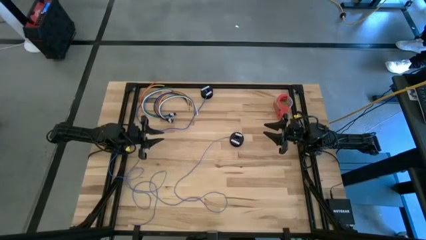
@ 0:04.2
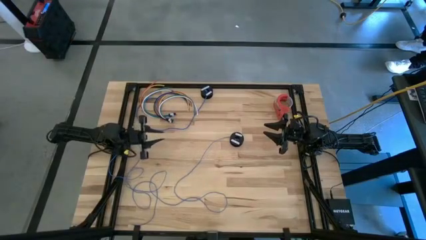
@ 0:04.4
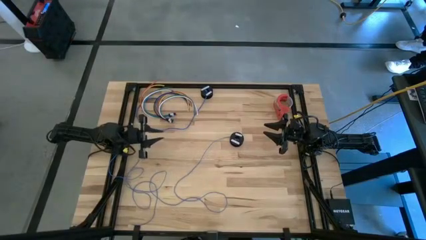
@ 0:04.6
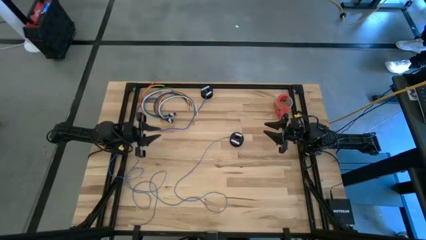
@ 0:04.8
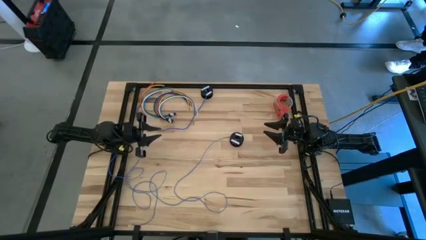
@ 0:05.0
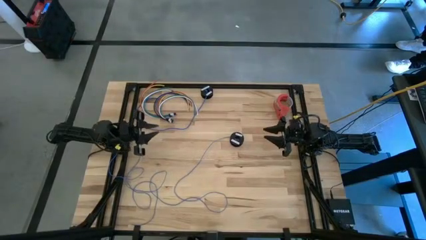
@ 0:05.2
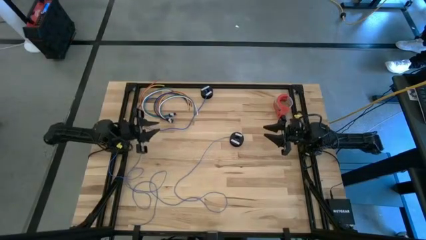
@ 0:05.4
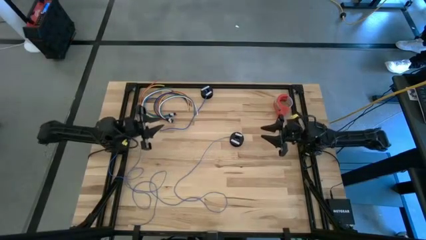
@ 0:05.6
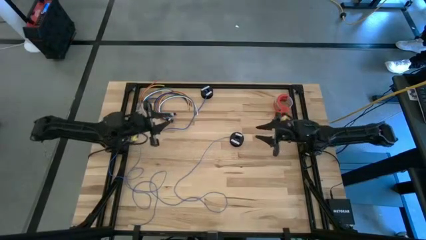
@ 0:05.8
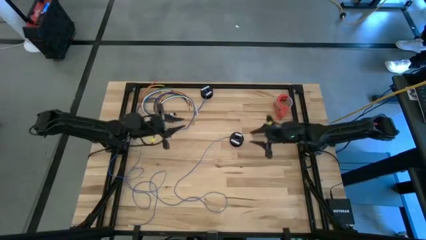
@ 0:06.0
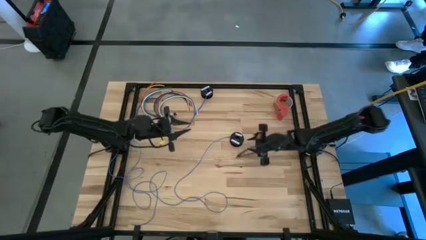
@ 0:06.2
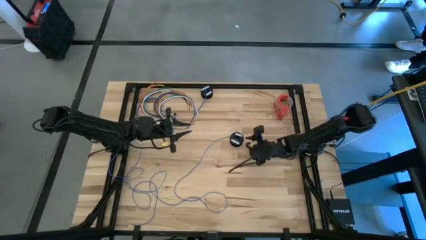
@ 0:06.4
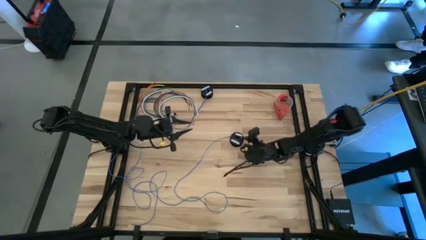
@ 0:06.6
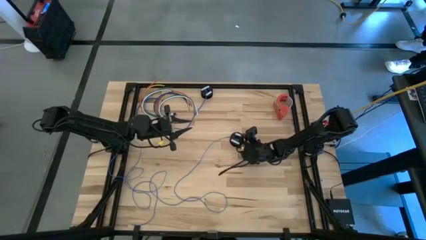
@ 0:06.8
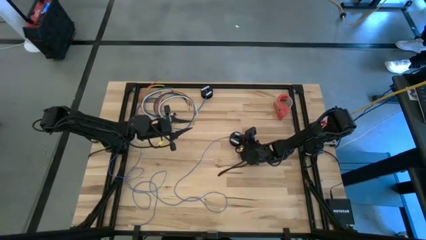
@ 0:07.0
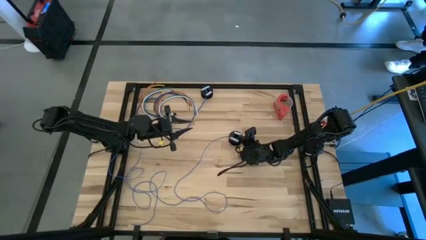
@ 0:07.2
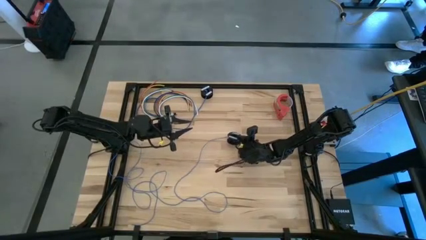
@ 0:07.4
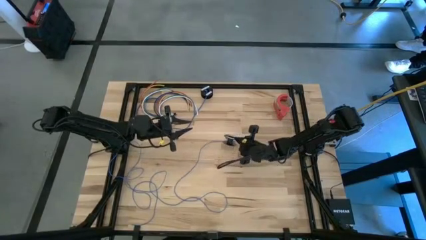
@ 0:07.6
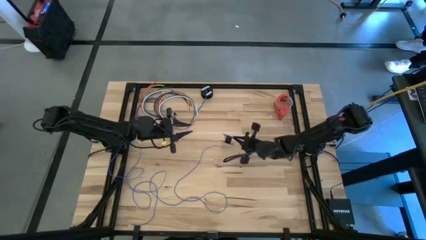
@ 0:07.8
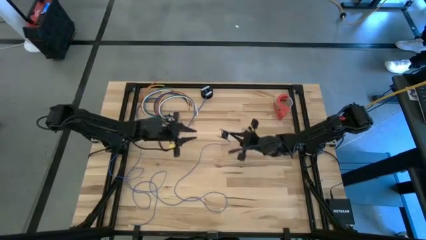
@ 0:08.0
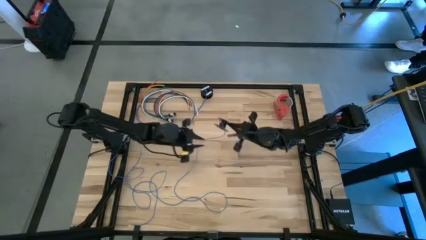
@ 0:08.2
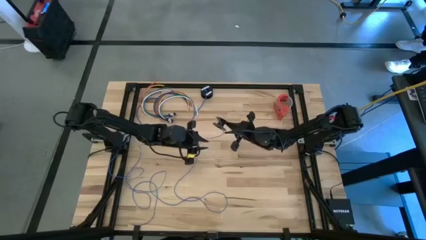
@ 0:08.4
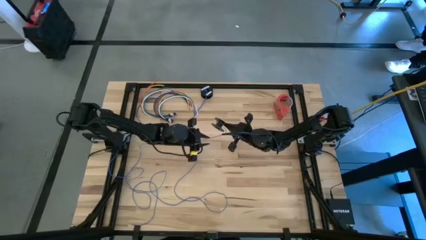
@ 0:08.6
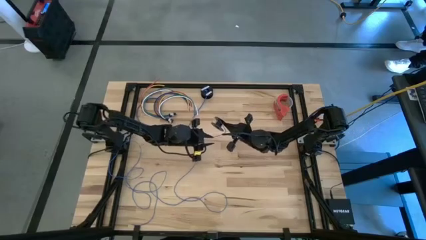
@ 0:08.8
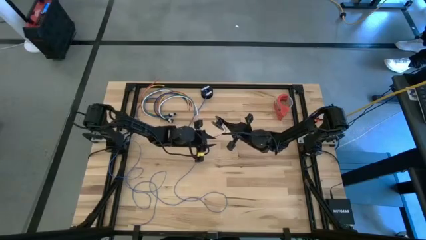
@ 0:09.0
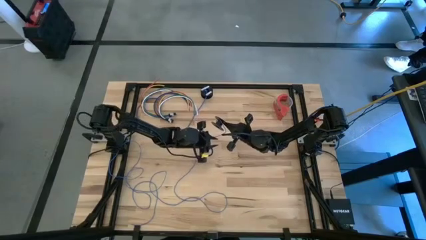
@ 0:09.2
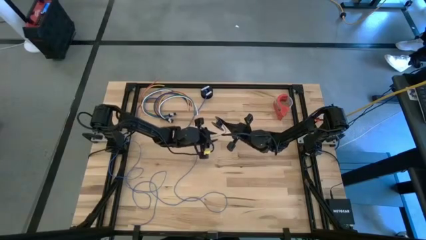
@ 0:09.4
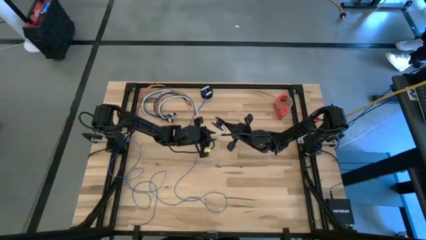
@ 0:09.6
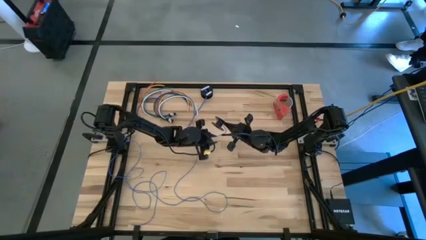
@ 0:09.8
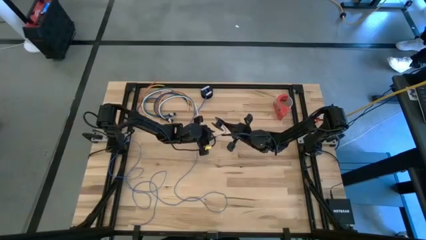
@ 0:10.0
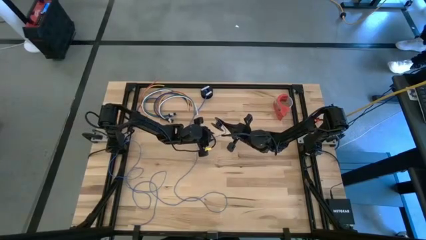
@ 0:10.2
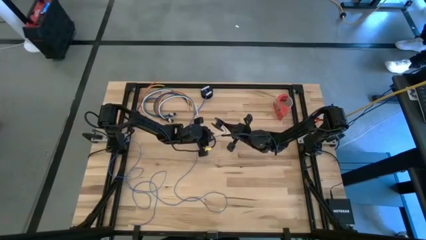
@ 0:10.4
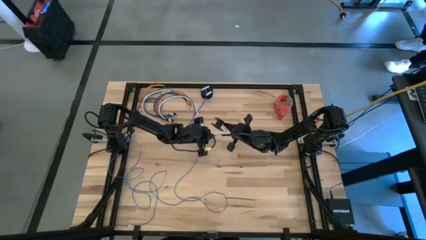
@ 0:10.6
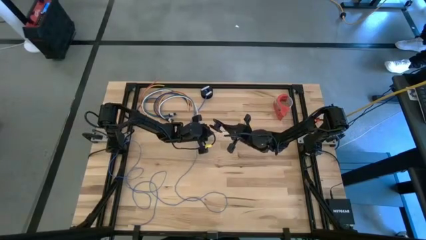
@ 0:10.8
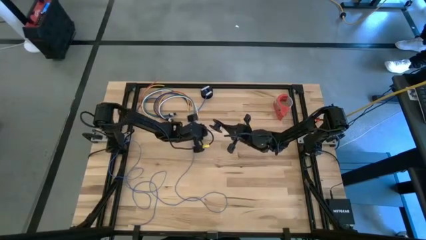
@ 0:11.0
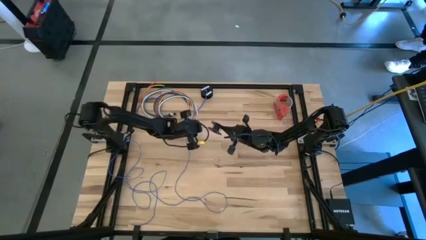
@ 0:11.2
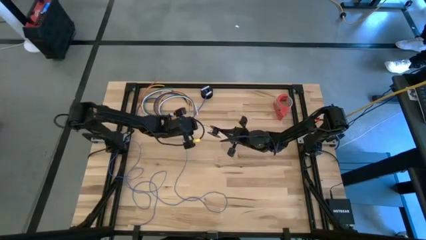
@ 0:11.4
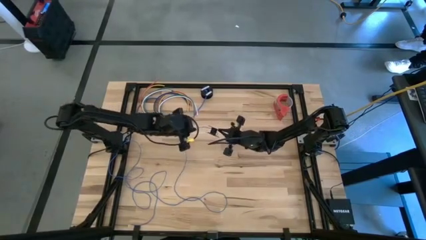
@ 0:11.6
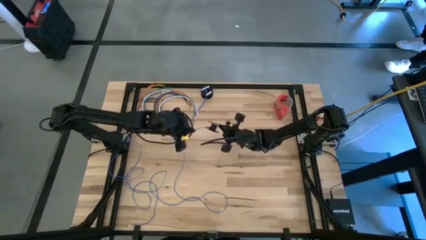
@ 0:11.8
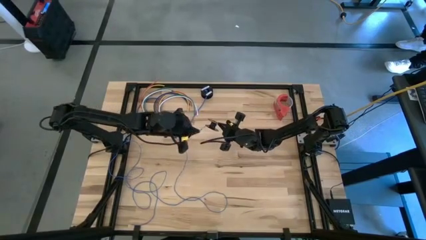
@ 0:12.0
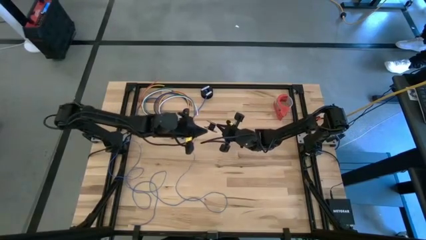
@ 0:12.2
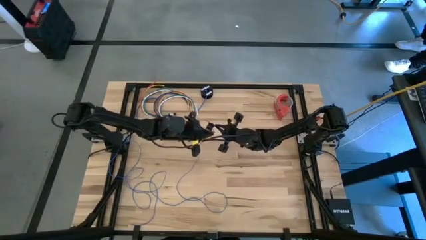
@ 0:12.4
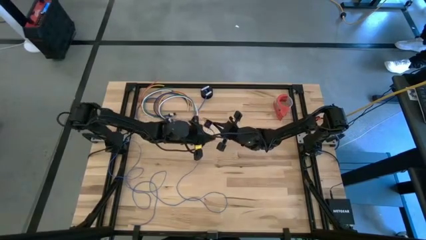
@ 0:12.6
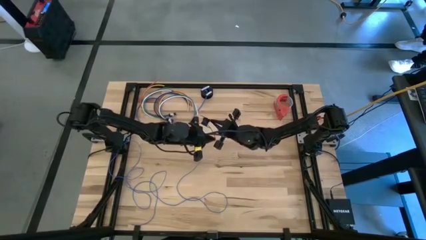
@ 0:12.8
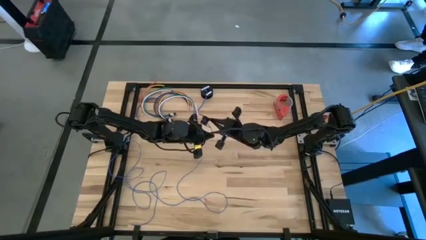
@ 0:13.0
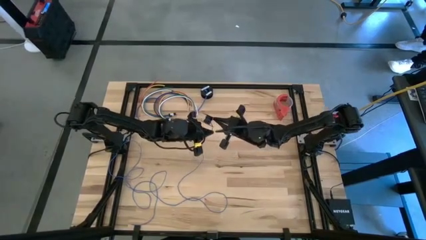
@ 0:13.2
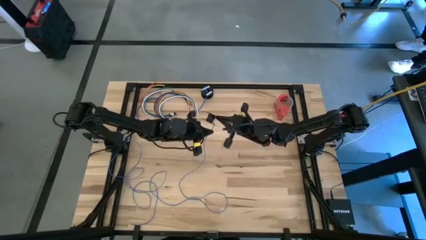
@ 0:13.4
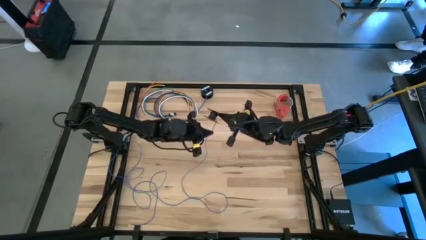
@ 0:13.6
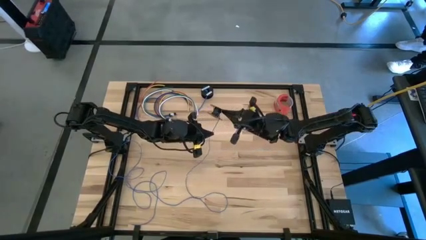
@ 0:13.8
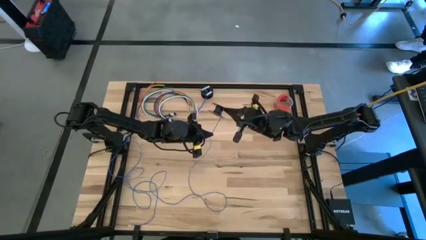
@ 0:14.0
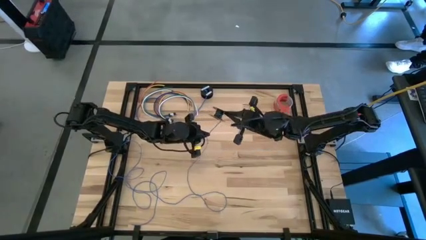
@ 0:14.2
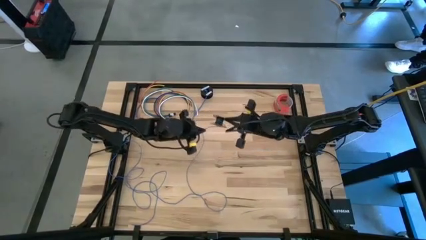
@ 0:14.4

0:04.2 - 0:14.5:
Task: Coil cords
Coil the blue wire onto the spool
